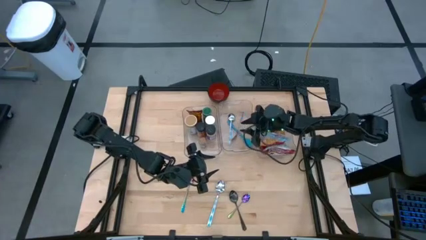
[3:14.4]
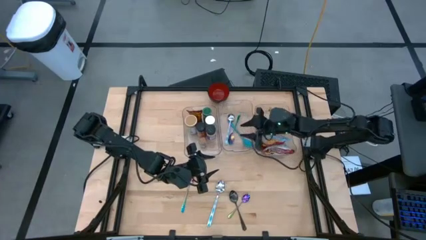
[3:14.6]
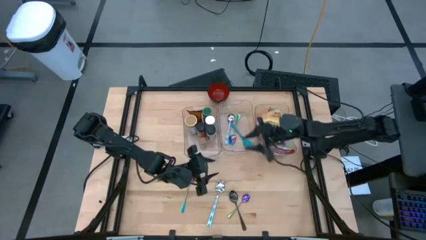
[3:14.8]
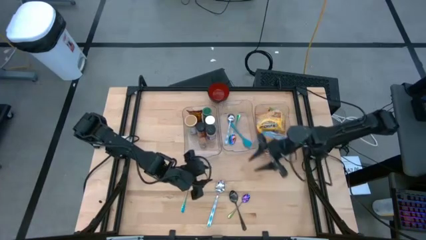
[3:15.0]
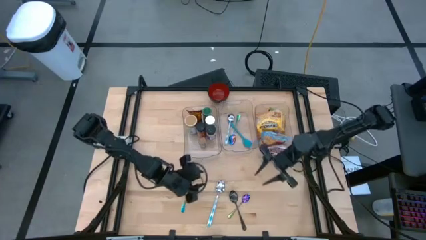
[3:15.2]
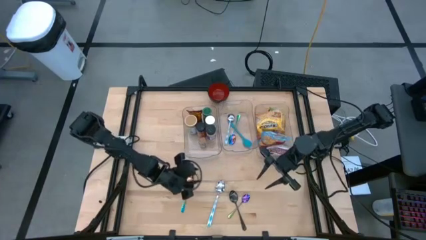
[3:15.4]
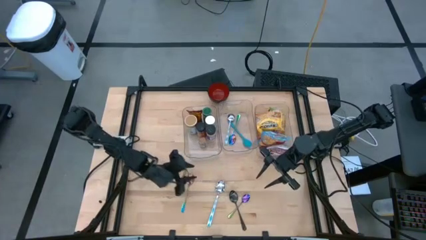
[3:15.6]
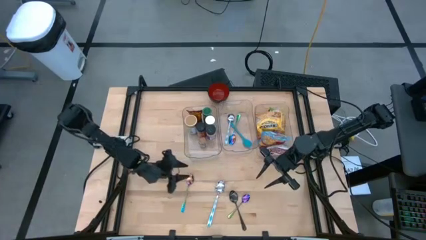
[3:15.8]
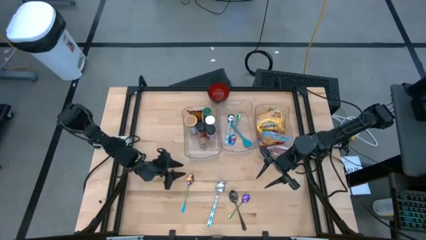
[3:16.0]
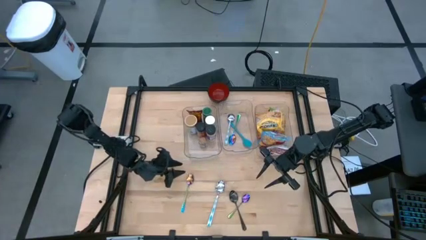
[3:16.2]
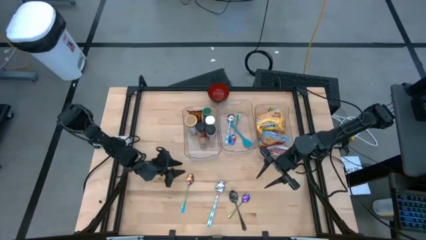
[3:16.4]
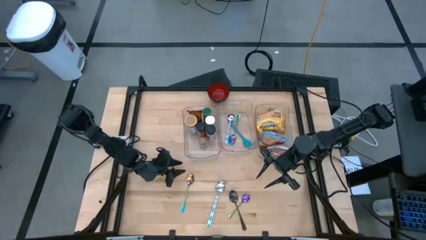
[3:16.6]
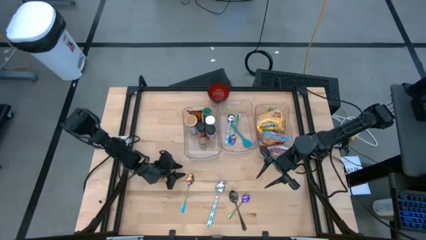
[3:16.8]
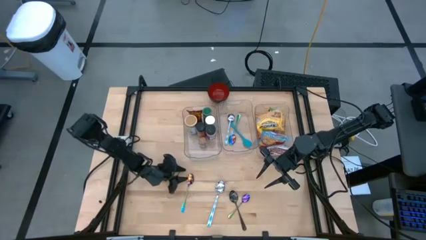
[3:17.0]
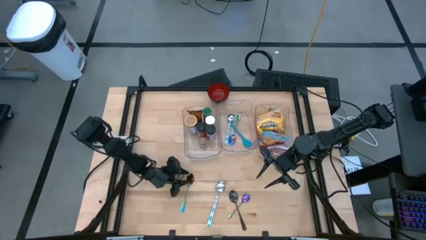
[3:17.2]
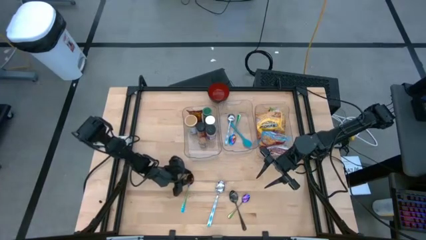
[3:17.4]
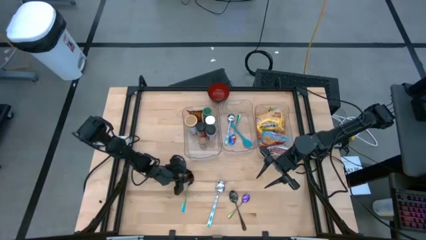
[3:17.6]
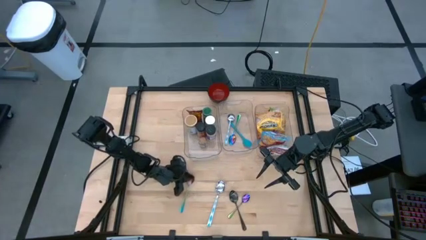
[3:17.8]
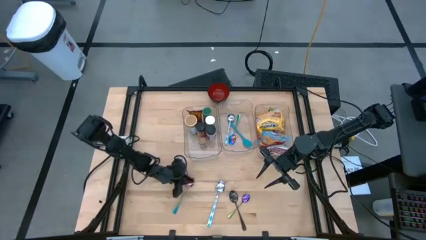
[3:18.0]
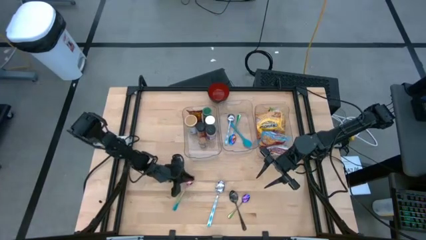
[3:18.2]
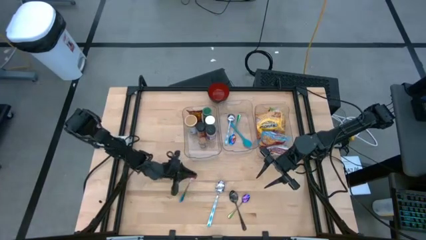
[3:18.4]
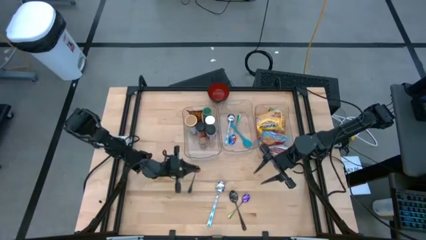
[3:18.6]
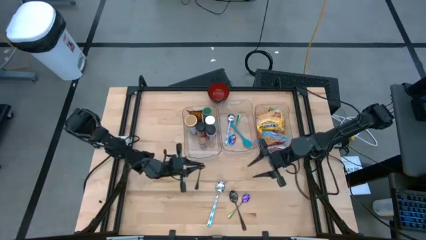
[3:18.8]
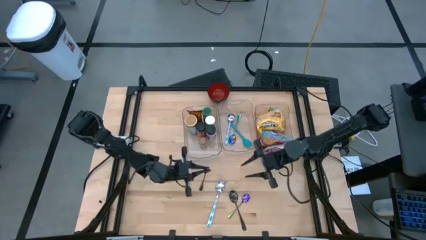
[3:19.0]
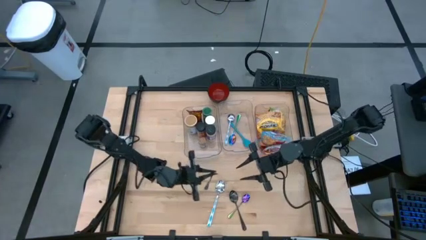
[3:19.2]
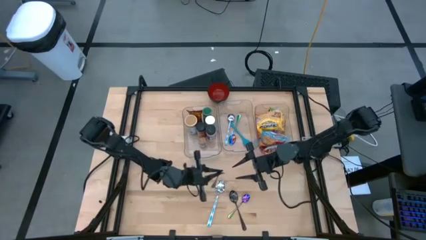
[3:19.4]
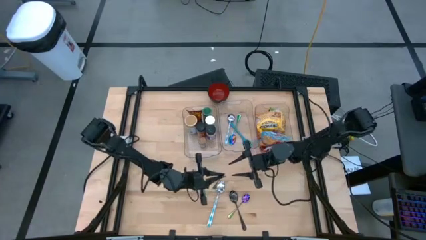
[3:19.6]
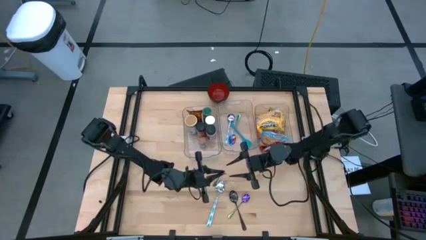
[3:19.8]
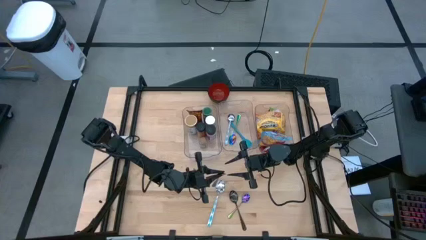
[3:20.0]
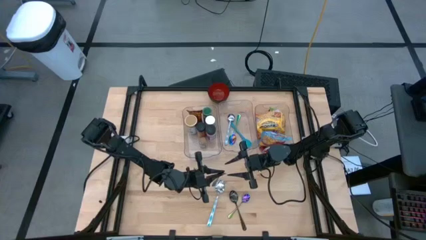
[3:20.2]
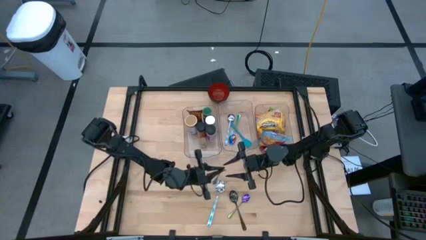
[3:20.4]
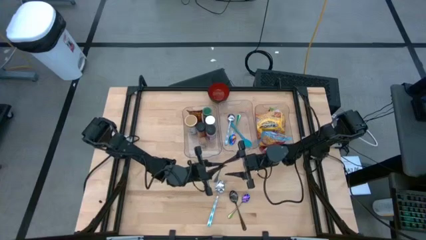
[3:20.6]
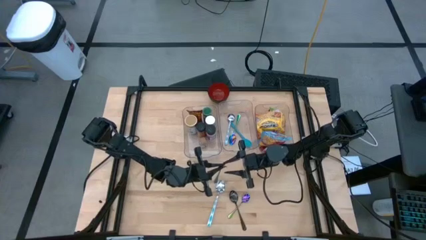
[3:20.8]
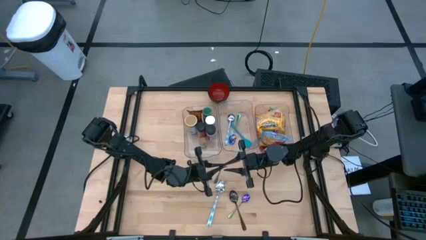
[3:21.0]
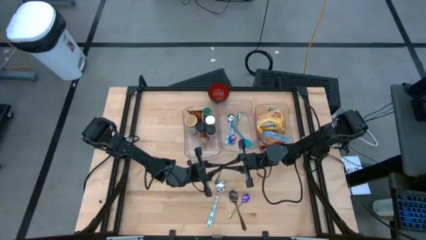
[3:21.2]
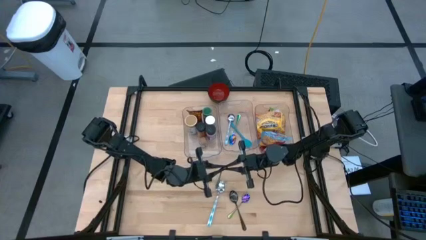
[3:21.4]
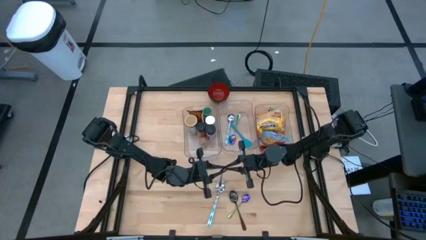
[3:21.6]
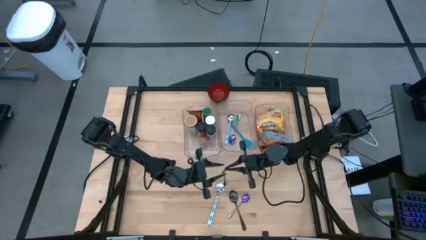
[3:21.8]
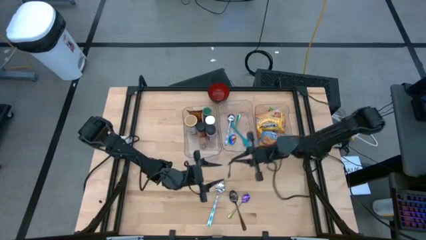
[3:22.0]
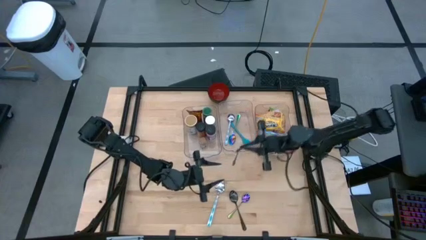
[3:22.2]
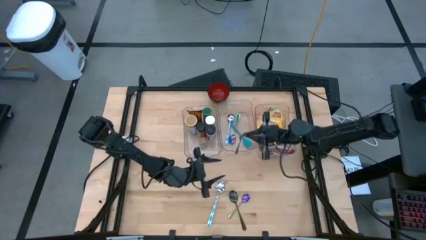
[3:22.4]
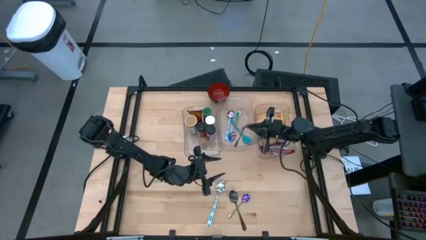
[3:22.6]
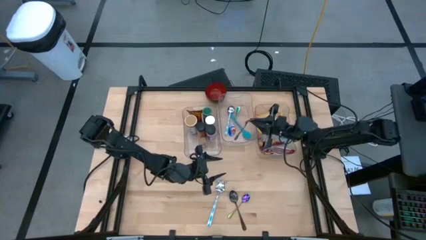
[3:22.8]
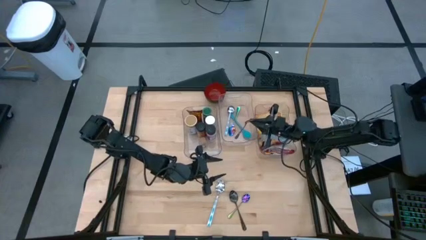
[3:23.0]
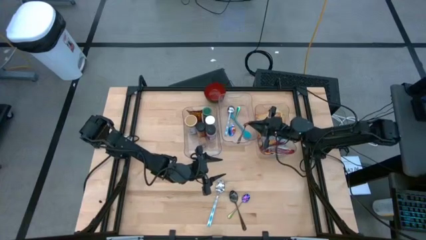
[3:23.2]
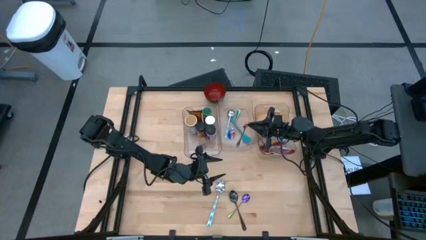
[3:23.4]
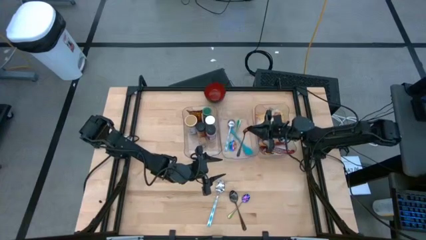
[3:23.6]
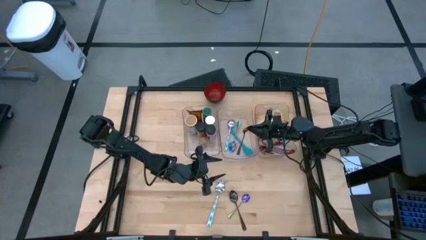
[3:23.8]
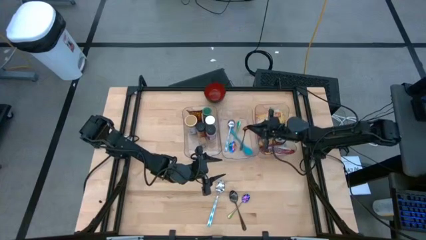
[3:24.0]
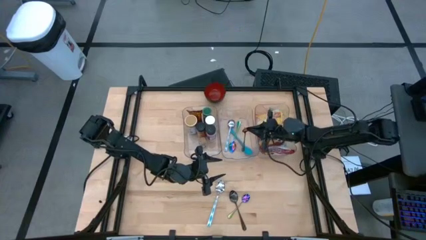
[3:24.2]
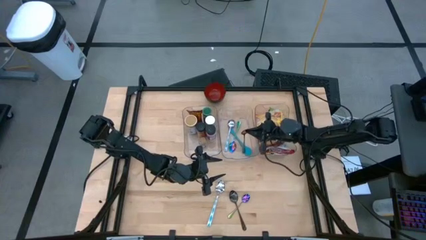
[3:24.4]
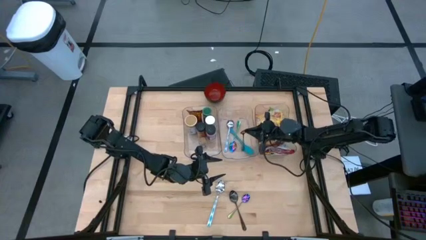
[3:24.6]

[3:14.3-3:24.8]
Task: Pick & Place Food Item
Put the left purple spoon into the middle transparent bin
